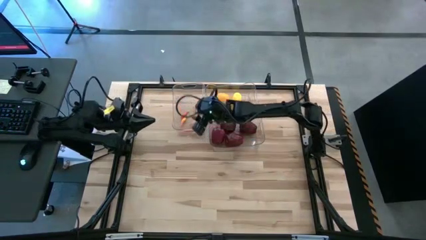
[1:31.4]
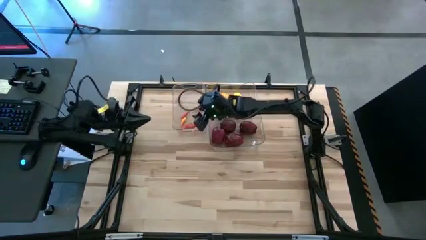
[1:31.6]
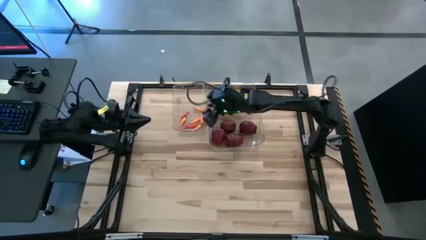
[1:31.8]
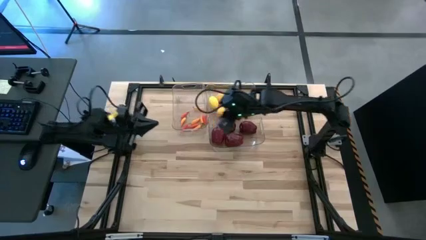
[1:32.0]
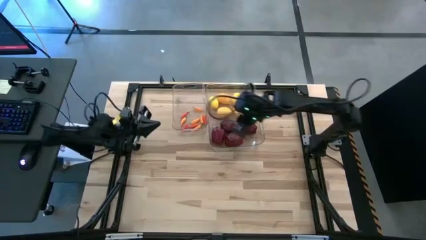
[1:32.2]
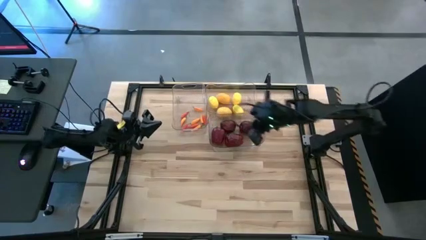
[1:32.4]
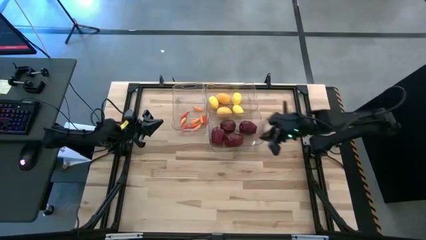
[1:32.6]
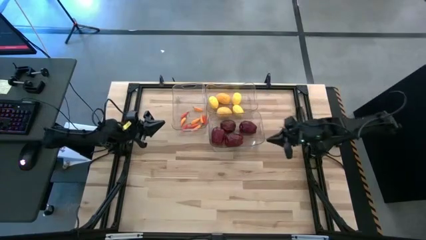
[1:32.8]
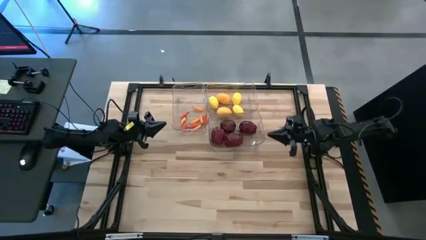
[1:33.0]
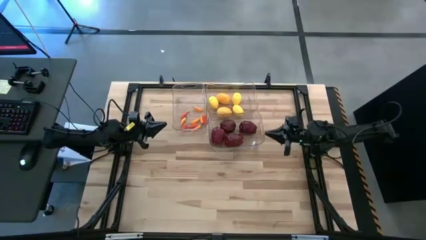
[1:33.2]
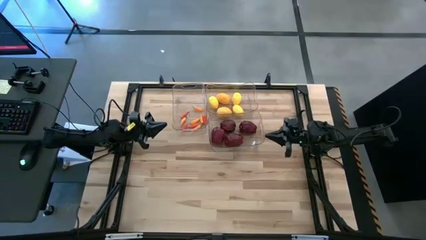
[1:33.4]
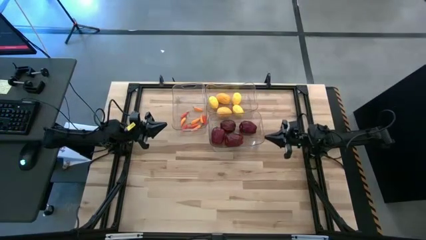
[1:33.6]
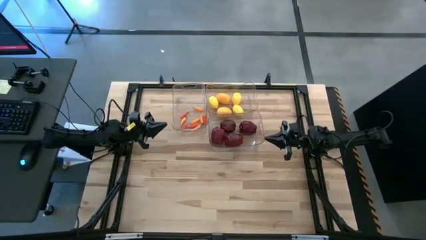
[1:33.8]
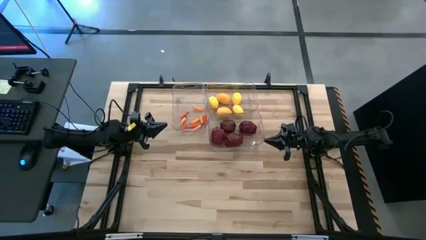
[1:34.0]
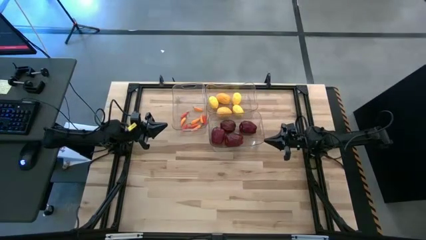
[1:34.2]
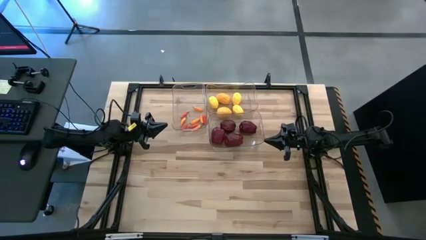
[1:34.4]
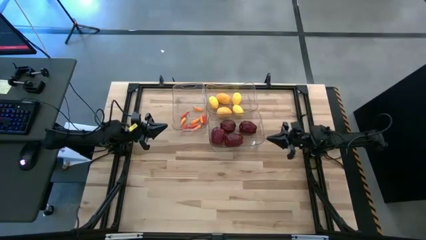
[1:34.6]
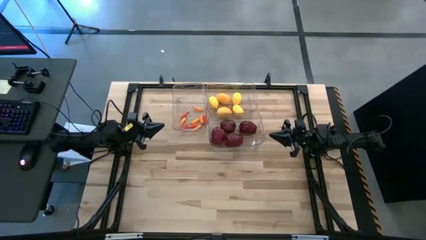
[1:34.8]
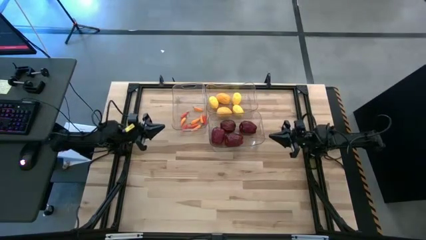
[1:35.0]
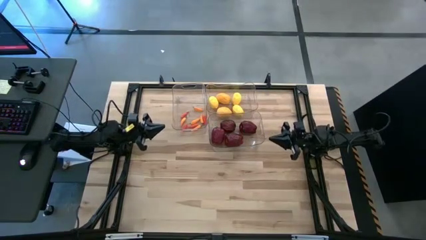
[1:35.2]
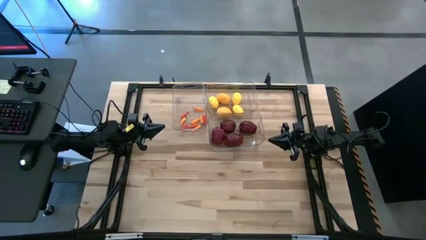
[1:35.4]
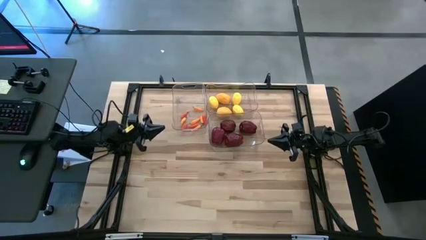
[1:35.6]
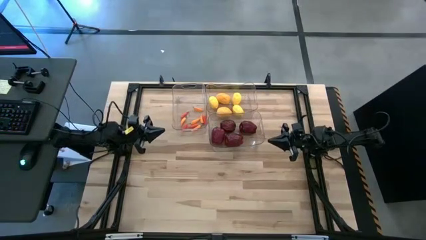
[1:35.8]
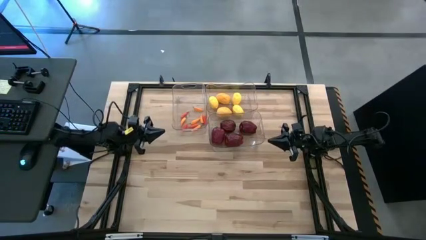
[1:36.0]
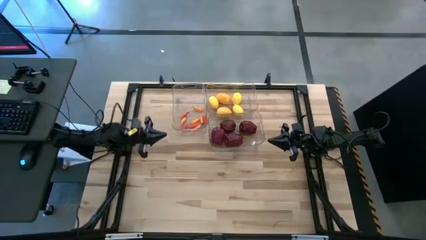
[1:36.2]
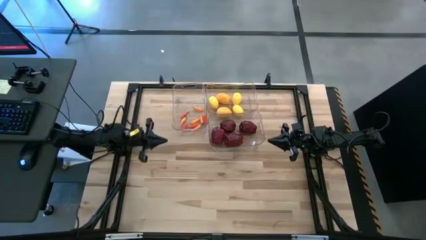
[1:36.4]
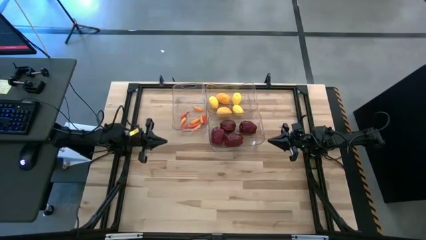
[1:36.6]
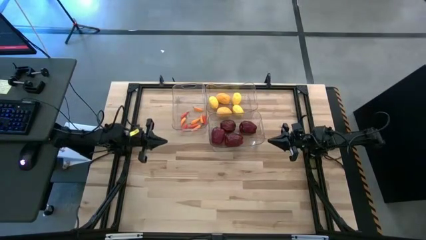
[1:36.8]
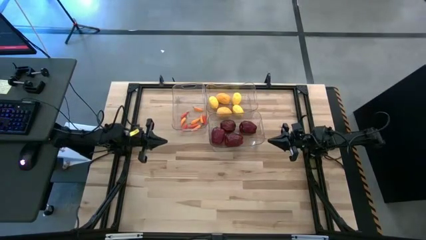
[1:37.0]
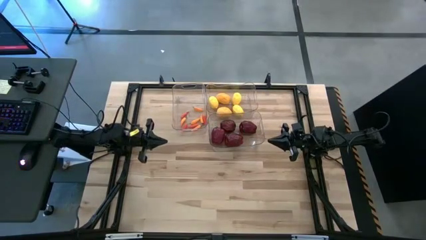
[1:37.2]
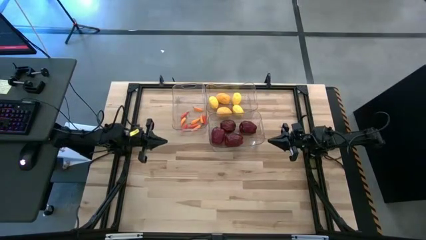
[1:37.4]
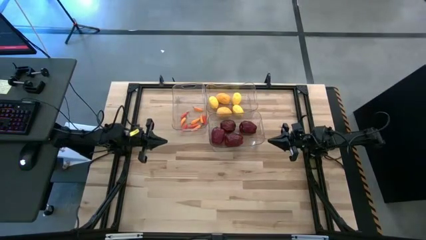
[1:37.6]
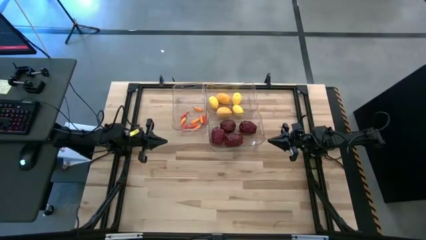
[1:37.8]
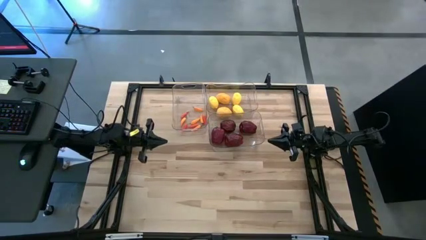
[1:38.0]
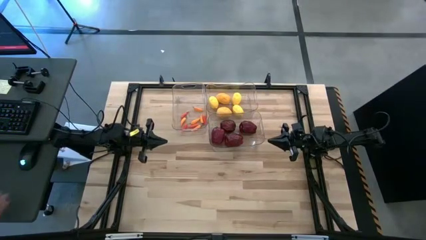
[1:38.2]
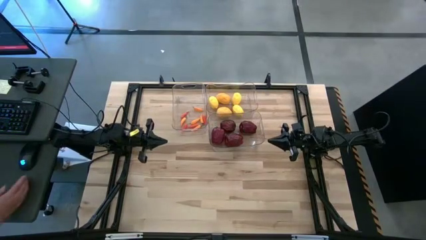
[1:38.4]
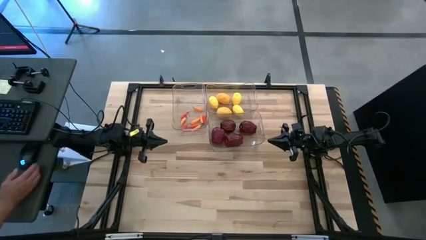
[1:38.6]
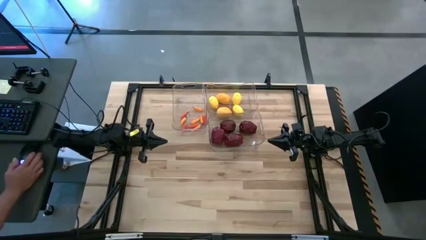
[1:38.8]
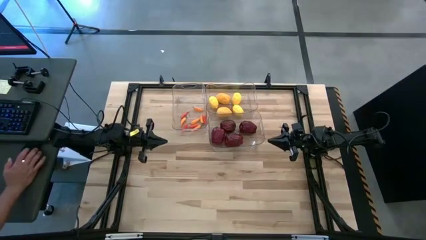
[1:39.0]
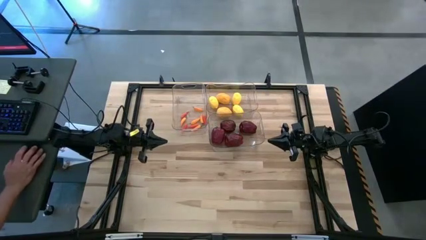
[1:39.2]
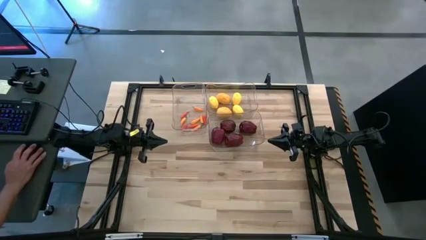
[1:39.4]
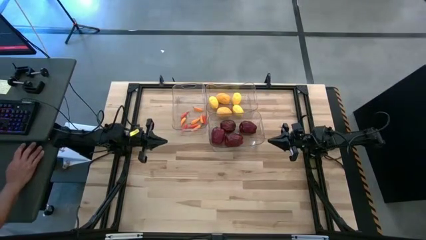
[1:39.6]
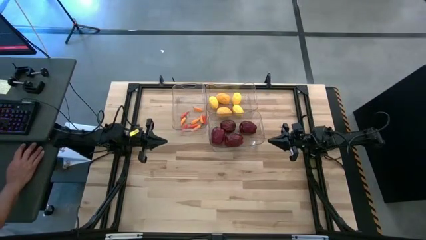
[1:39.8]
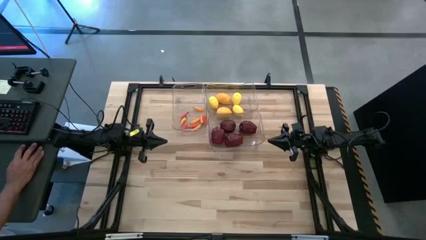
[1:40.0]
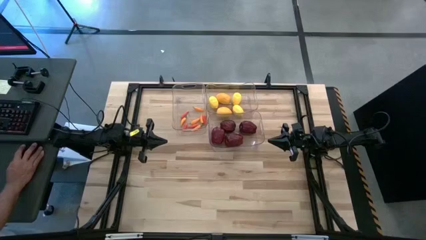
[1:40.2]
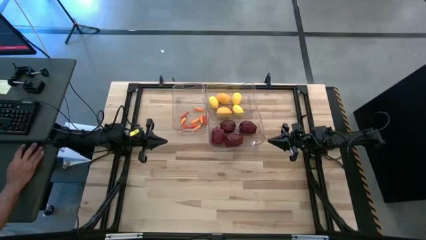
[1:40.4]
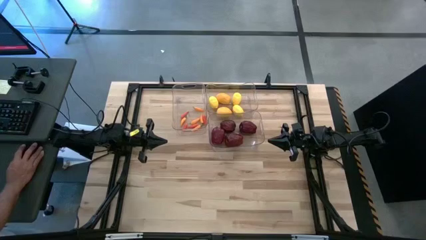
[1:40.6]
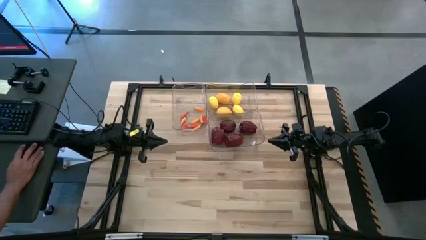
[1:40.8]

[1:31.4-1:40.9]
Task: Sort produce into baskets
Return to Home Position

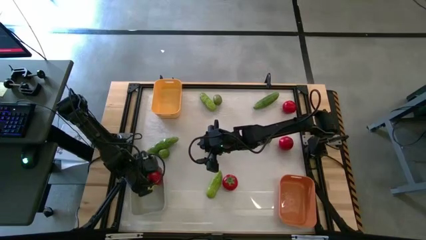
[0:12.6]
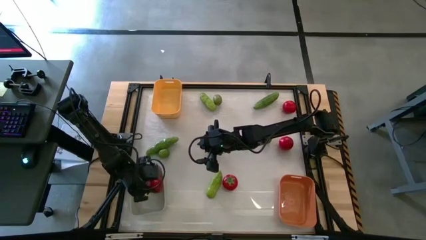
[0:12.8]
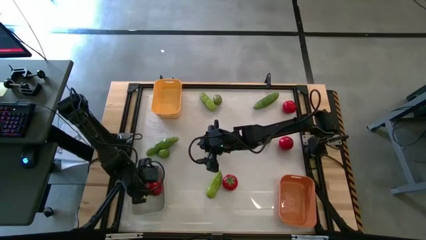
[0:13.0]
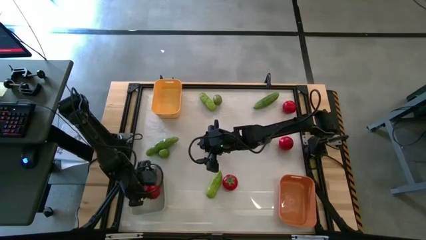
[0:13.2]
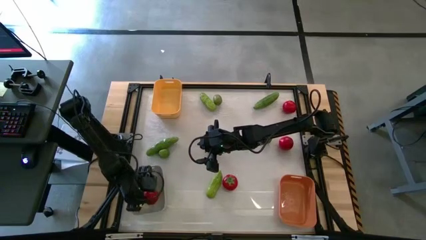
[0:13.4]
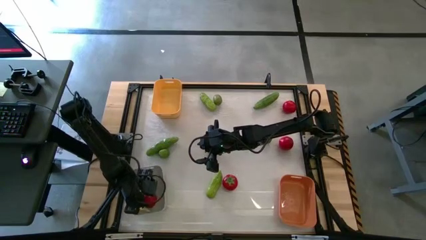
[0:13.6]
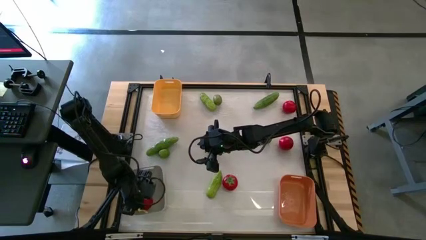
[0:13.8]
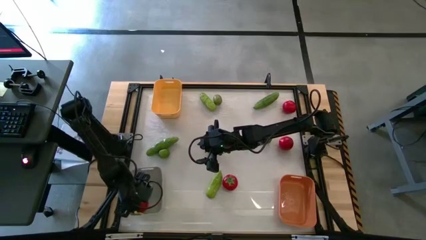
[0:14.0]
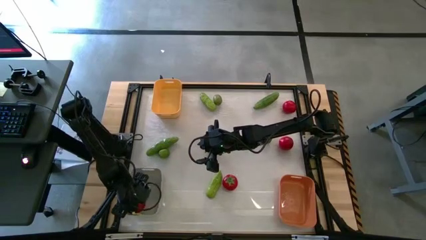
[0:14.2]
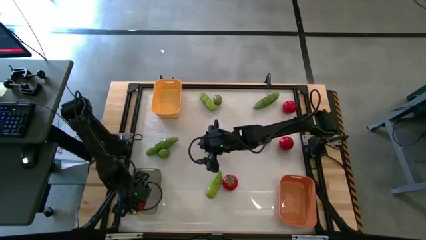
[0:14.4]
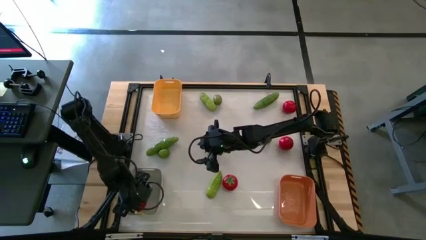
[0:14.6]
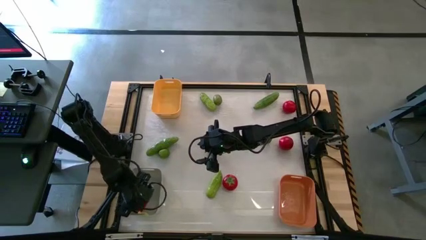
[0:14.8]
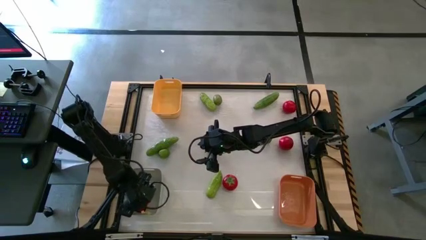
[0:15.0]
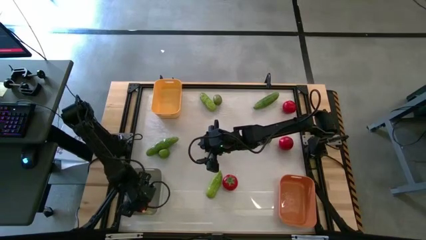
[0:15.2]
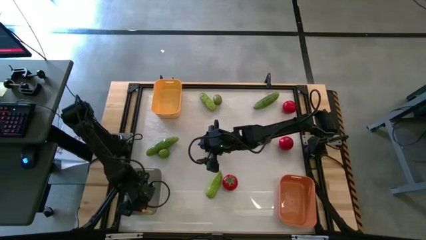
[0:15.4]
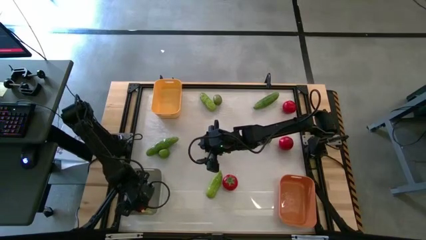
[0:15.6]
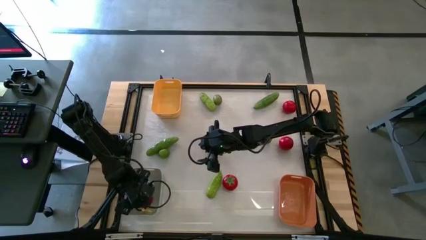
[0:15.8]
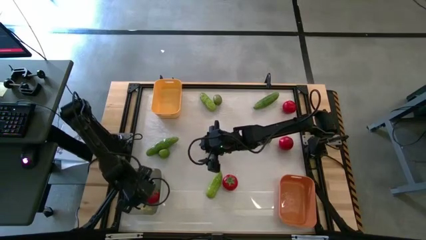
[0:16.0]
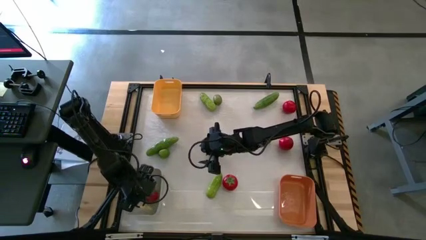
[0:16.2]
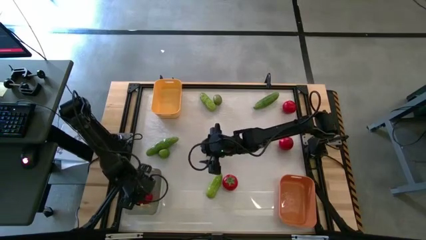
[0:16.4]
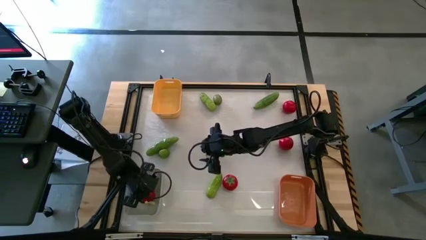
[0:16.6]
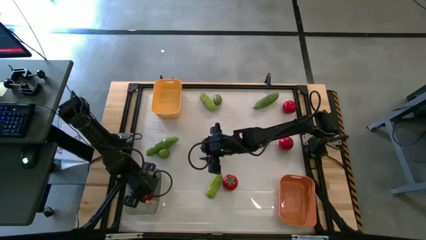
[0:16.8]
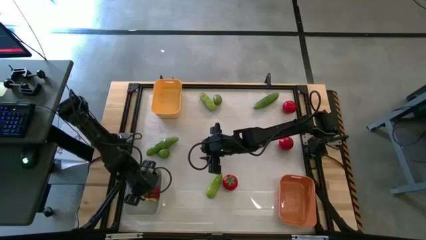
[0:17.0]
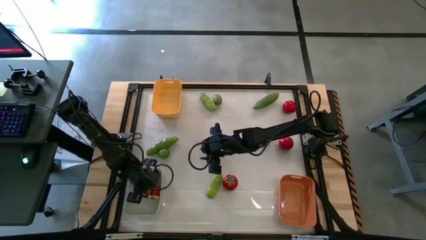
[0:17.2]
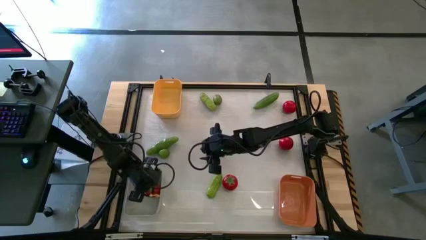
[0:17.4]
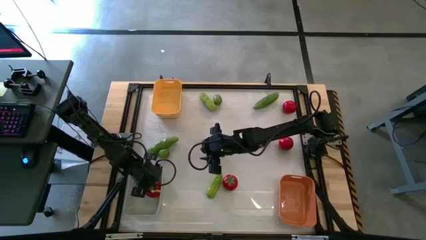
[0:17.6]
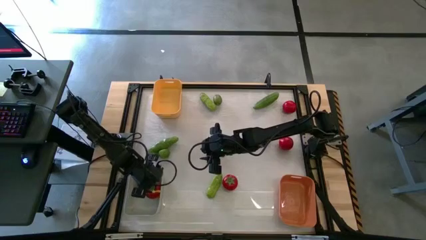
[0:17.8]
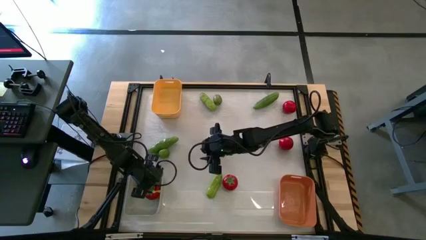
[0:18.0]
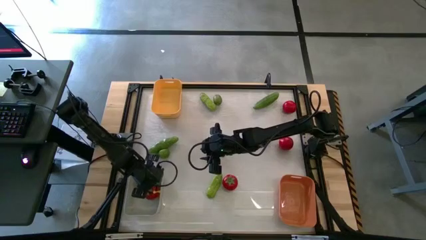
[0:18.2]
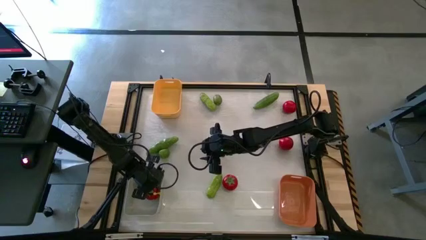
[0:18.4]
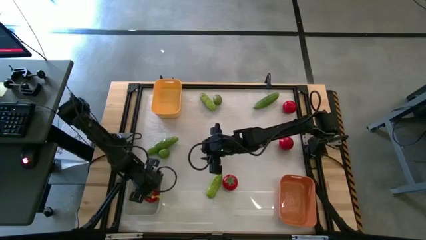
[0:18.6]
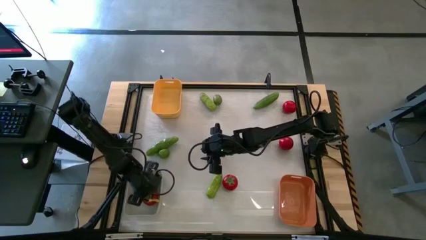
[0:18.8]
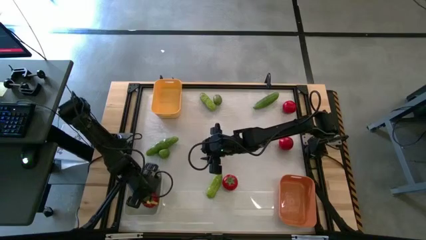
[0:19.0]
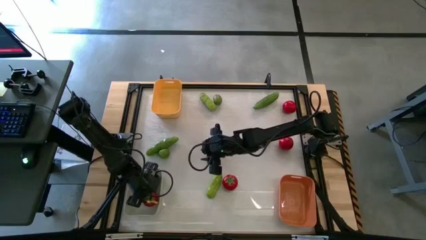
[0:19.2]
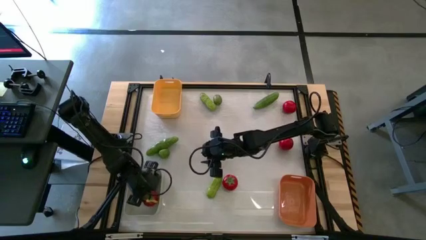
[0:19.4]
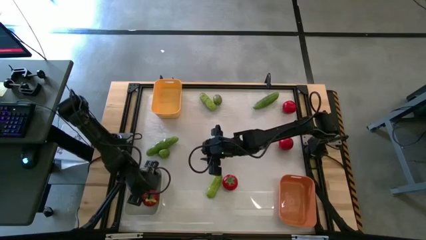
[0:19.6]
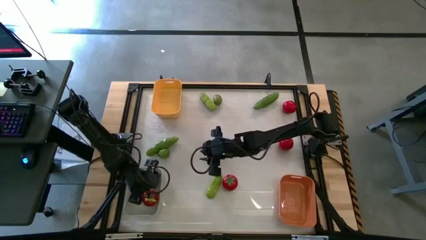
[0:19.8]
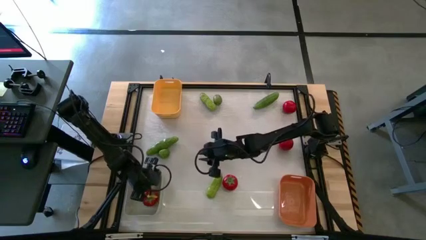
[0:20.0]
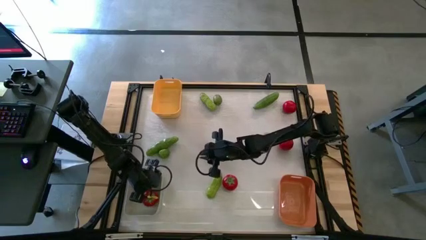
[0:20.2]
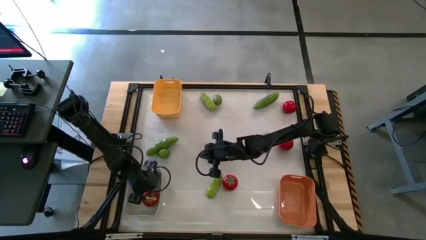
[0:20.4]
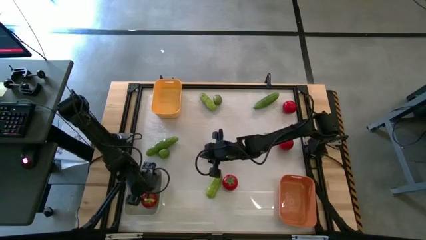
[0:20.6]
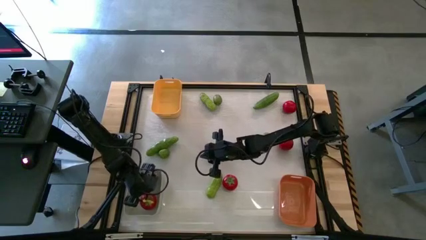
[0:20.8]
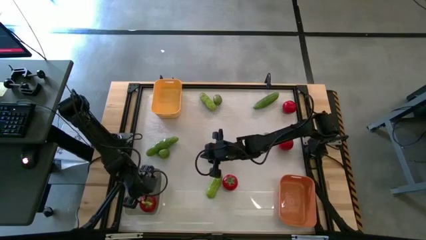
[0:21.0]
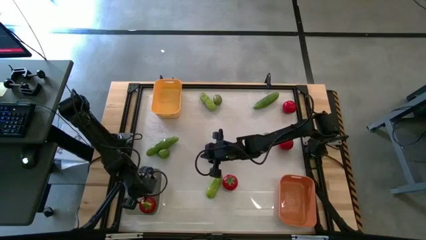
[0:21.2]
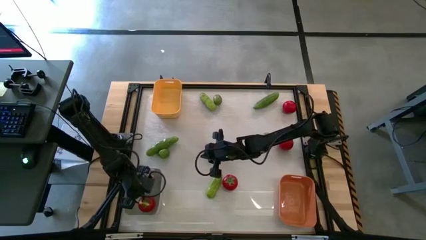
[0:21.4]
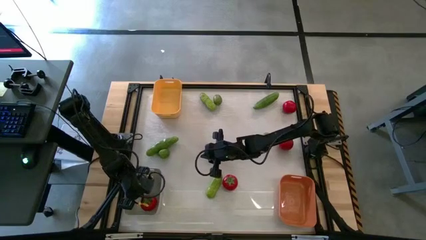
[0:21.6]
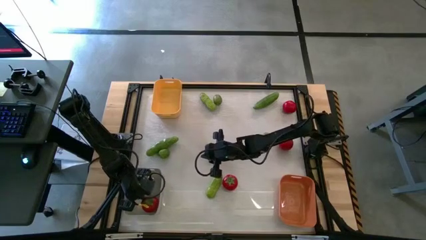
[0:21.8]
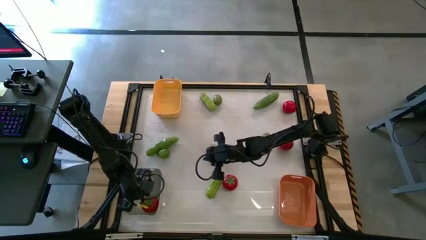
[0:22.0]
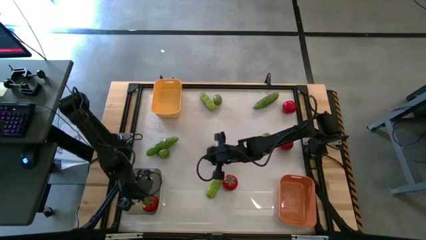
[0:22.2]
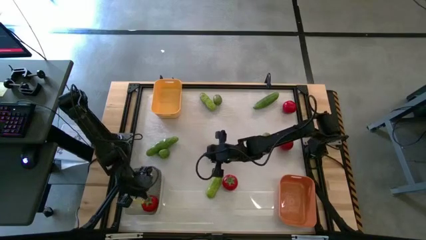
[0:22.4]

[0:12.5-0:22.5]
Task: Sort produce into baskets
Put the red tomato into the gray bin
